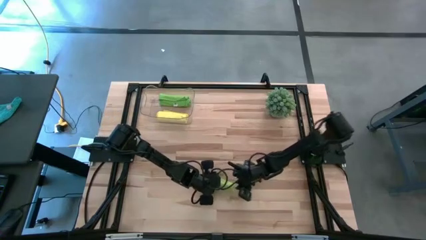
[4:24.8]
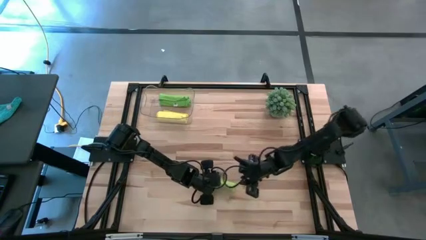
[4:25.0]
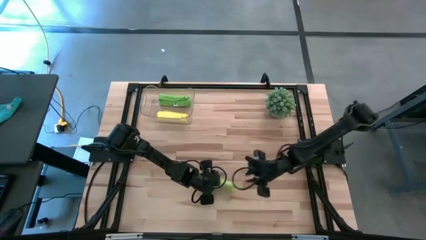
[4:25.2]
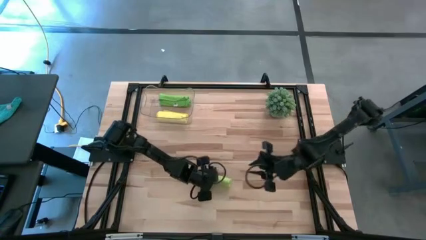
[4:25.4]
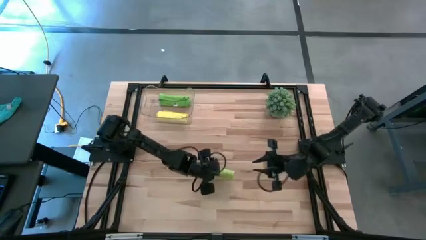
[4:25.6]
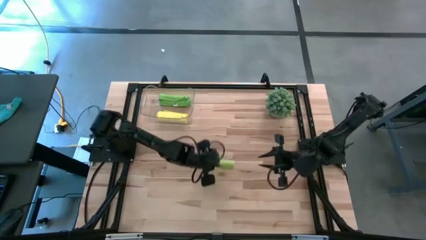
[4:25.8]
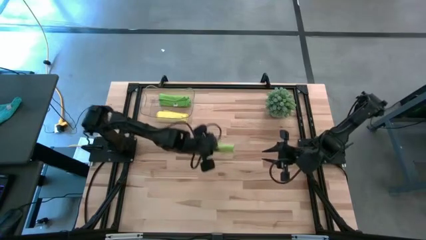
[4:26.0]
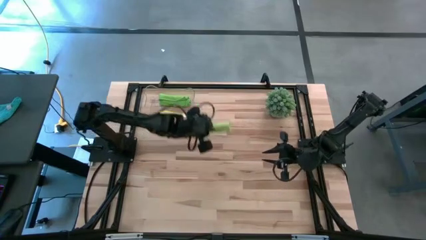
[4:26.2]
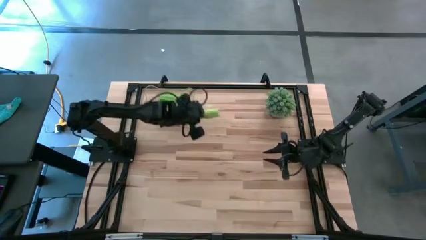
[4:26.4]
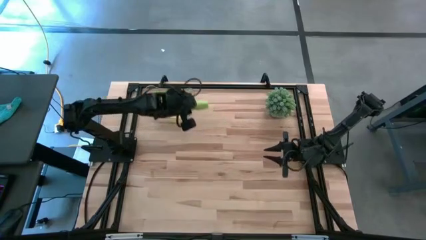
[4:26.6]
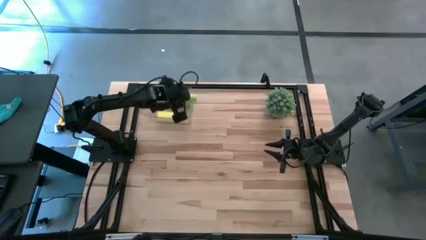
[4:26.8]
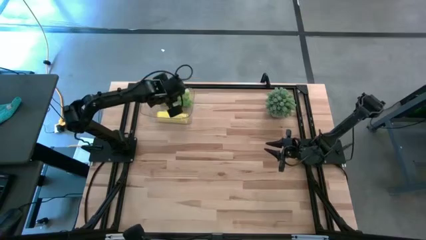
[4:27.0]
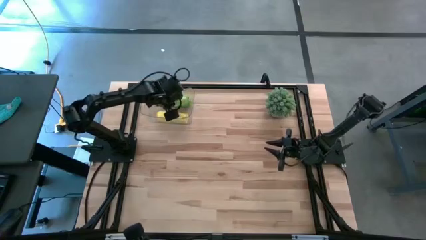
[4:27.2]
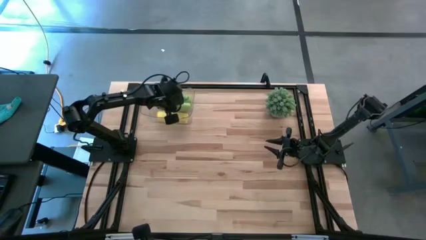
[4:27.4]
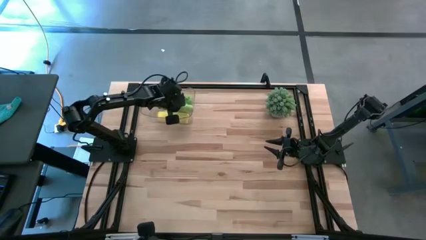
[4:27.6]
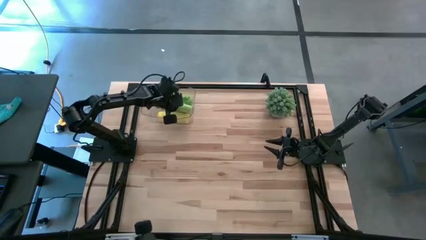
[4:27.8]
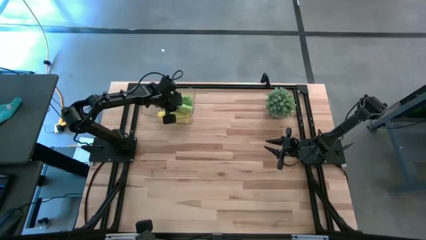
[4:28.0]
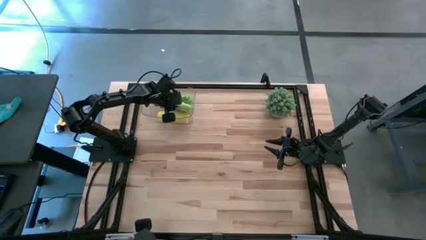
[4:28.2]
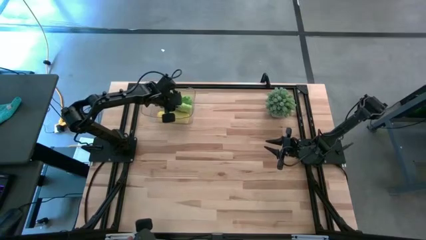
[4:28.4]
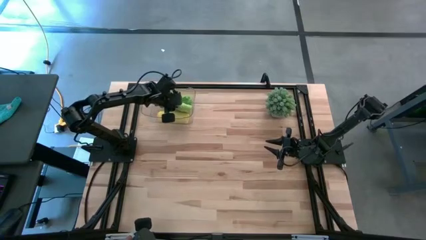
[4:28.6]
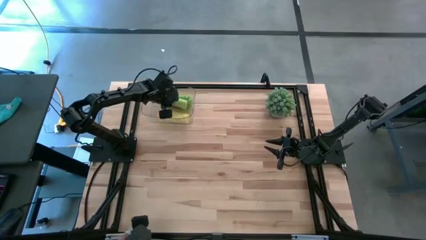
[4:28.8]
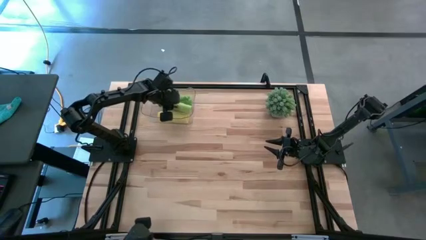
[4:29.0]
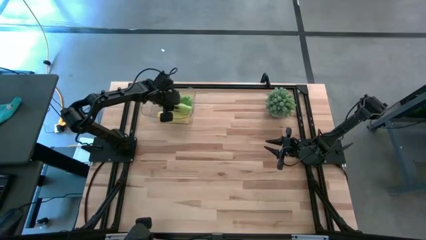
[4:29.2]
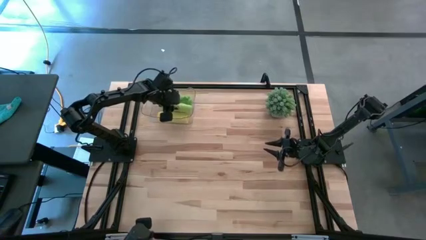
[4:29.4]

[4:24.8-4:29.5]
Task: Roll microfiber towels into tight, uniform cylinder then place into a basket
Put the light green microfiber cloth into the transparent bin

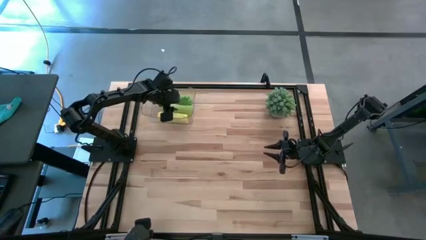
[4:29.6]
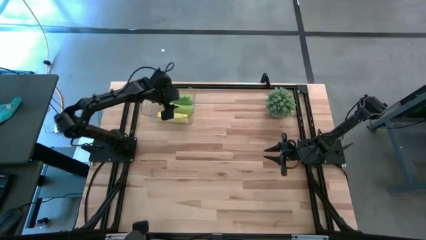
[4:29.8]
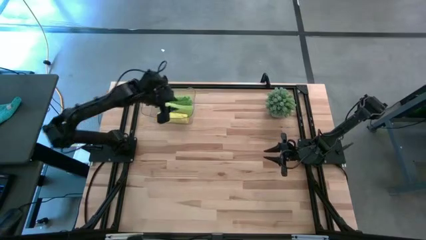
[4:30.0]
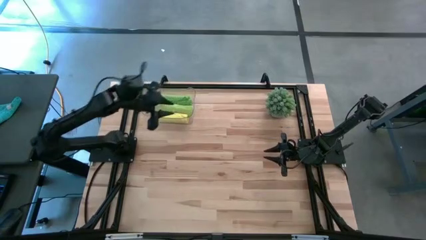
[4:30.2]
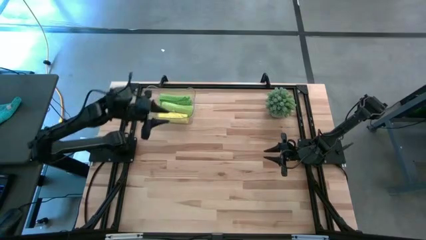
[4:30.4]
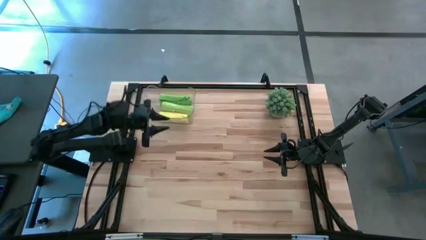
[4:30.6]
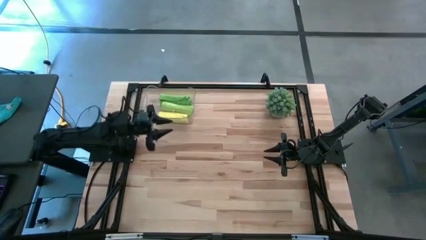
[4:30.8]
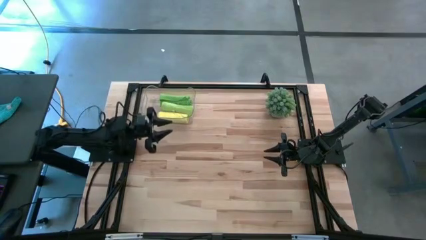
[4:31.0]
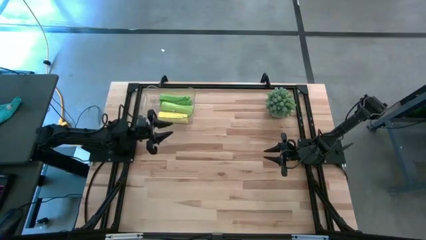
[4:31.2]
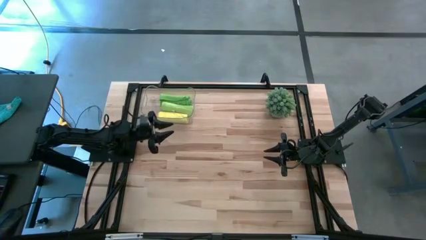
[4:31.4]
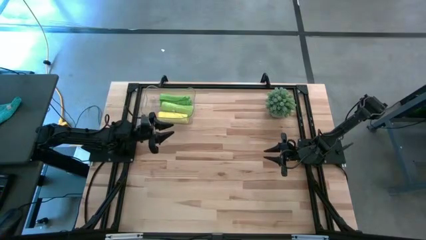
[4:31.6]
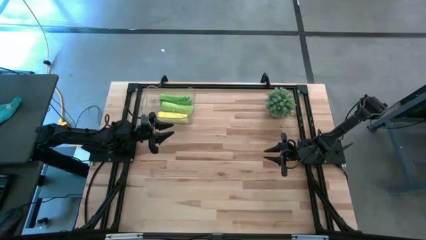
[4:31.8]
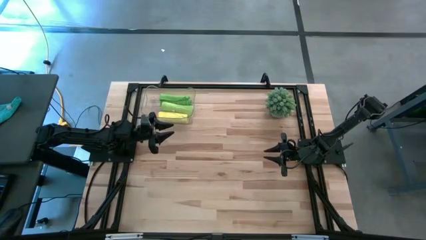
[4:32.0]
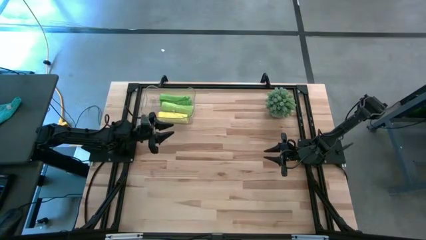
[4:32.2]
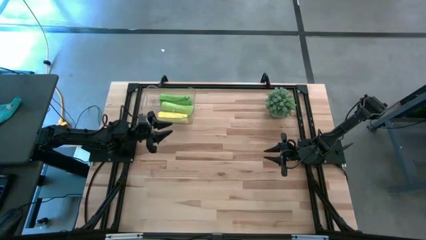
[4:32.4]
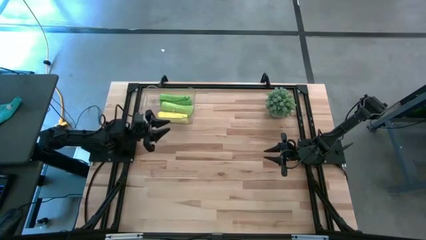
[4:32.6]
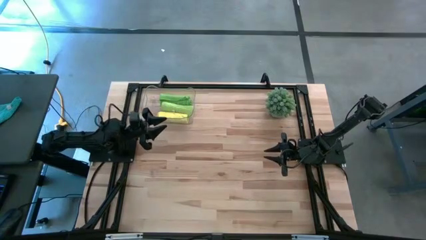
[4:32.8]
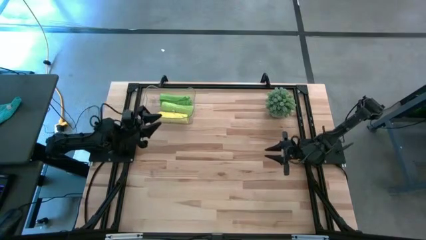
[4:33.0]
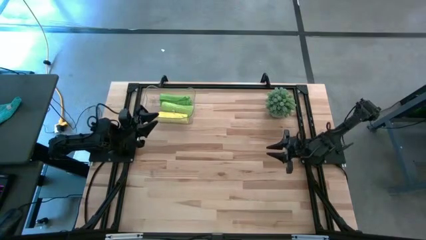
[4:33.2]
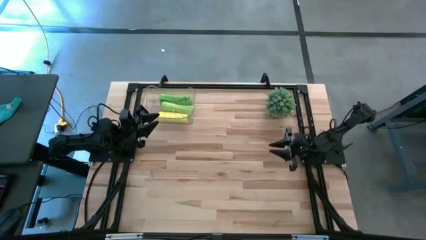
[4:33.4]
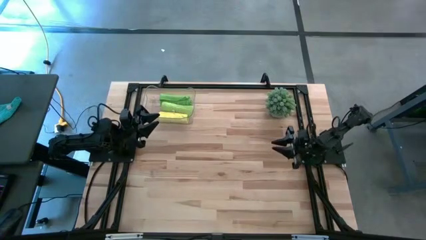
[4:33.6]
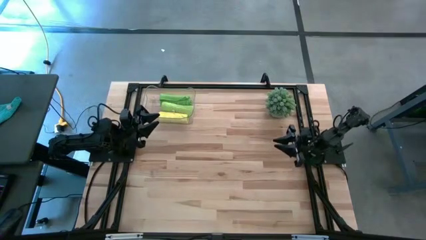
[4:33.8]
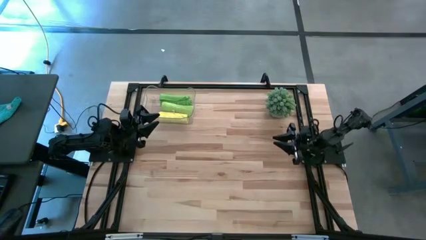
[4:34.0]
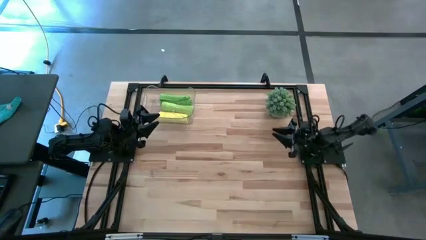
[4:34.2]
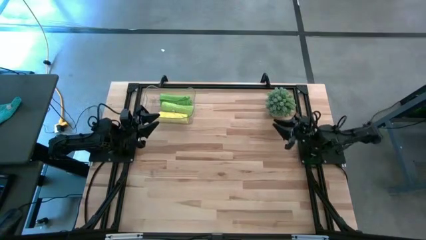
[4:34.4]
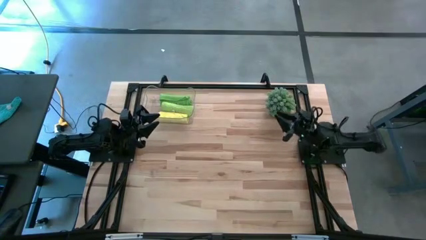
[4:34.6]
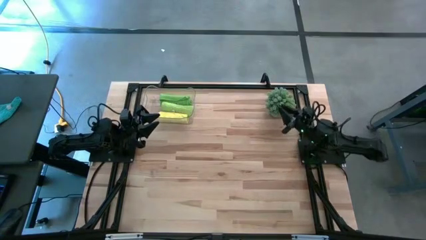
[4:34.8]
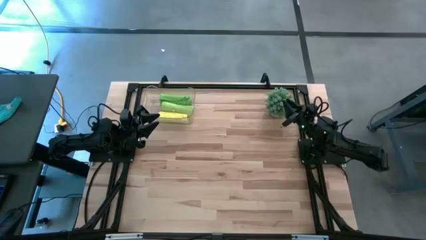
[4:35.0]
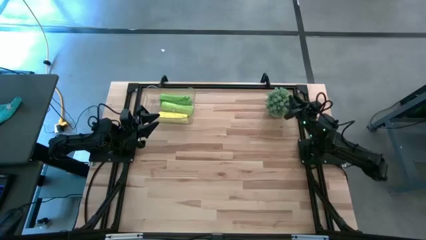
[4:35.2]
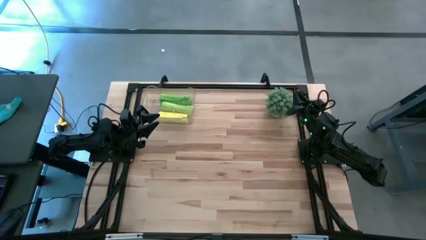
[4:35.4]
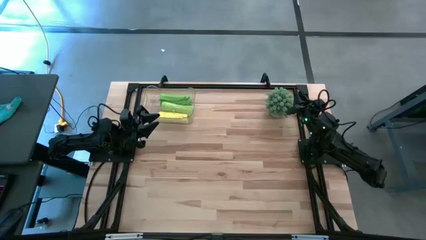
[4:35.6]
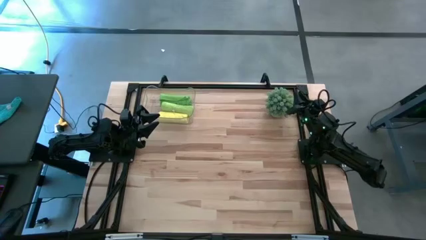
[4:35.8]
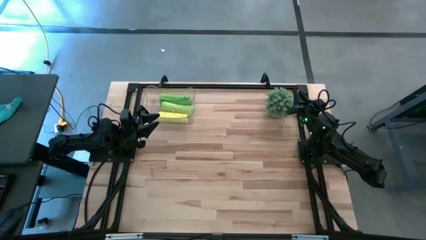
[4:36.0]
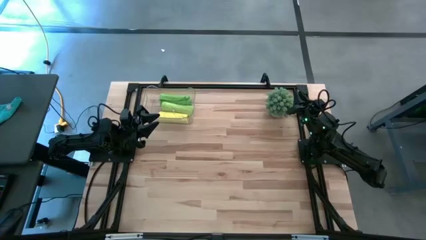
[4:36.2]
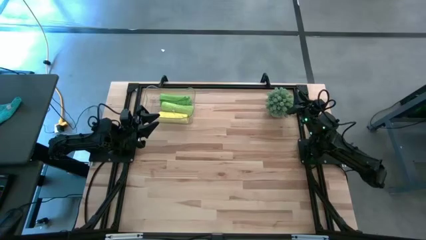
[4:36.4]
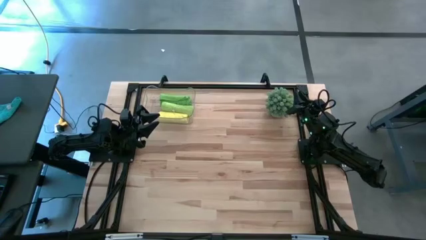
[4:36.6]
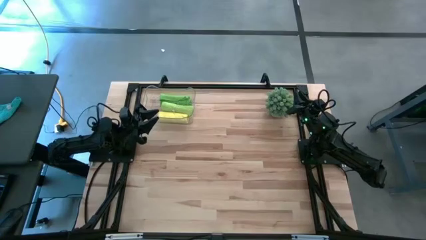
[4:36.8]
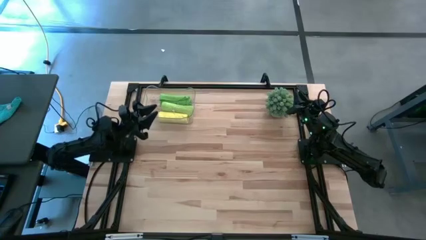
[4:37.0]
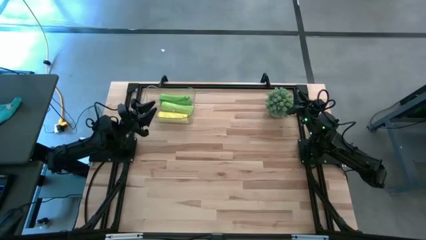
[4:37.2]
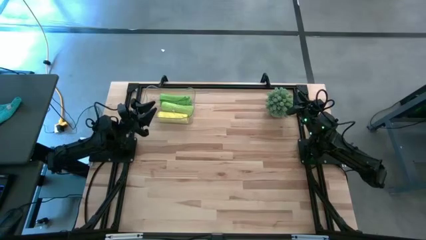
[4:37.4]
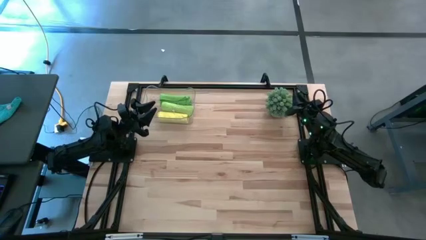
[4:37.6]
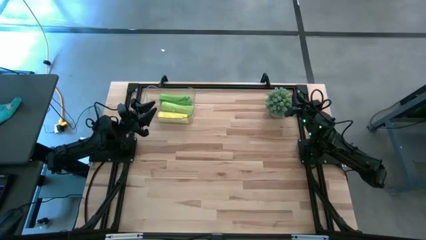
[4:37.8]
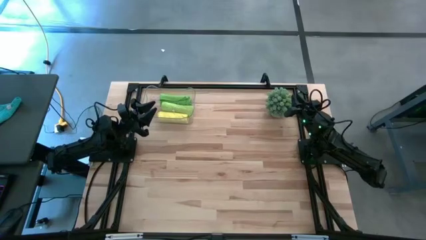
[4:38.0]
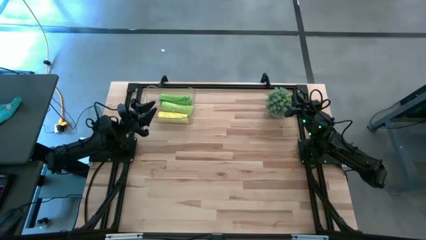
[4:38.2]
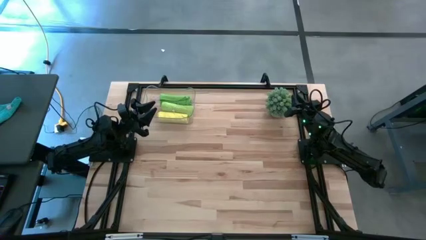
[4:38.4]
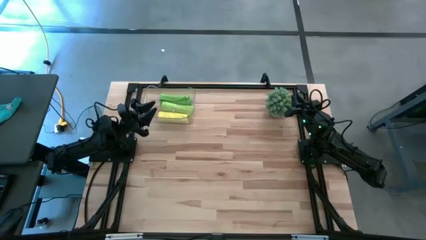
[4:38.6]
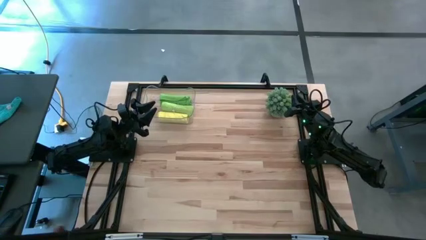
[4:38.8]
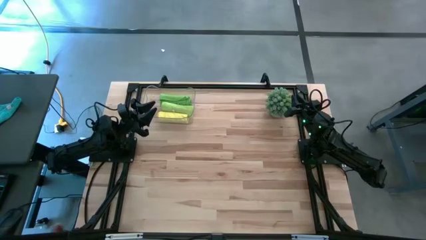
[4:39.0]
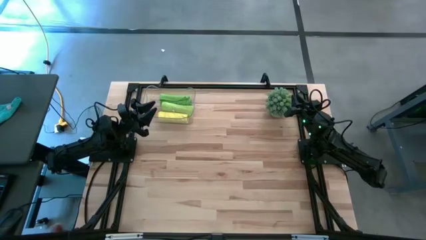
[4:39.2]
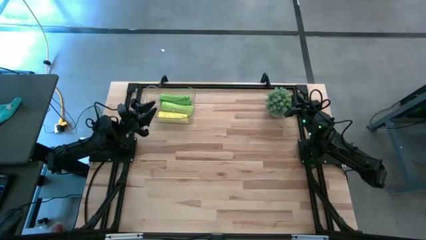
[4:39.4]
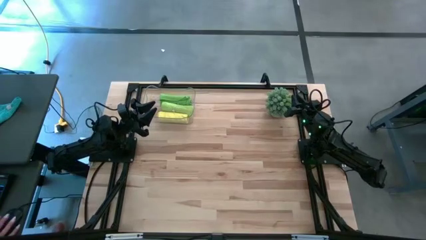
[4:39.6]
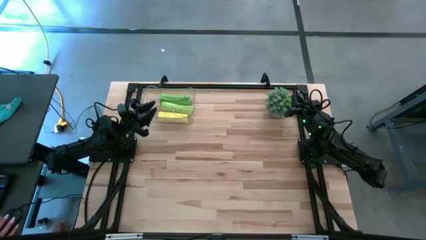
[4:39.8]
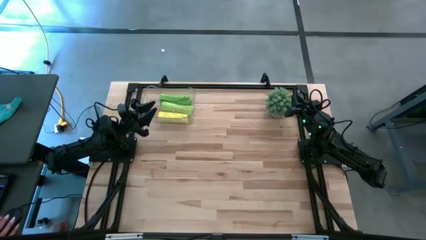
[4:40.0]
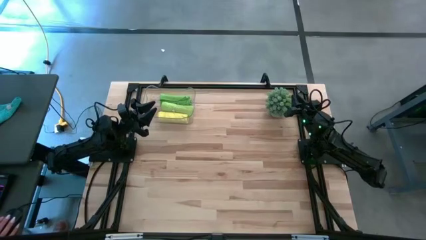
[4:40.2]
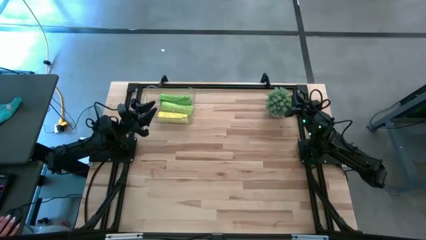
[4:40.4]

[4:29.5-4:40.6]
Return to Home Position

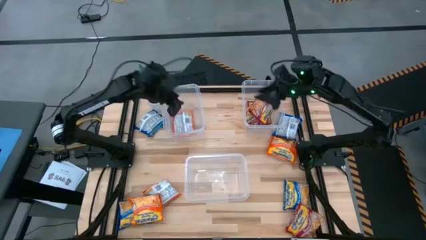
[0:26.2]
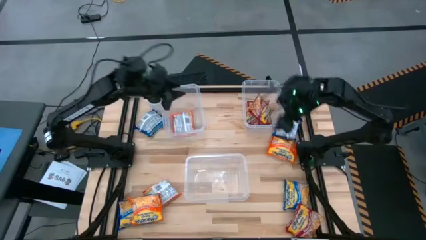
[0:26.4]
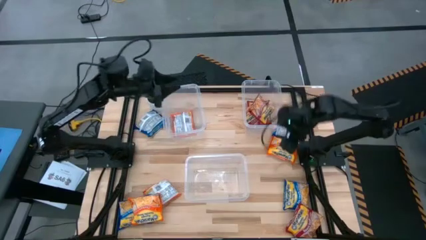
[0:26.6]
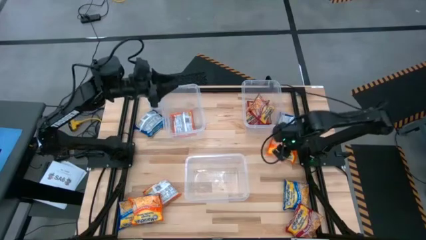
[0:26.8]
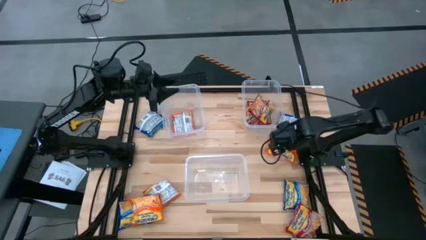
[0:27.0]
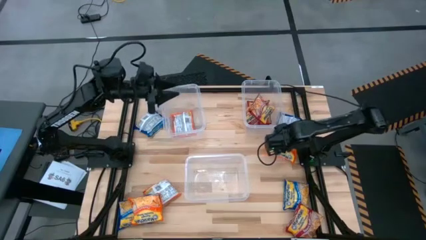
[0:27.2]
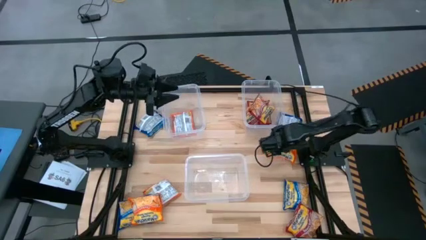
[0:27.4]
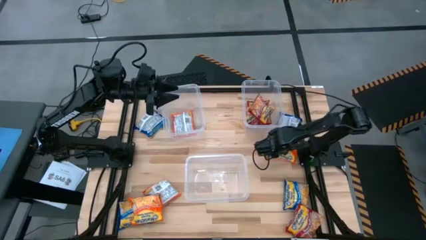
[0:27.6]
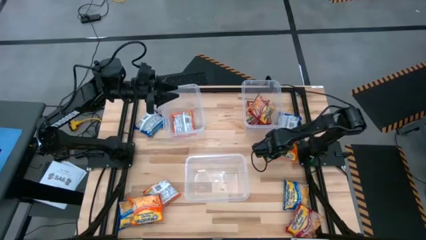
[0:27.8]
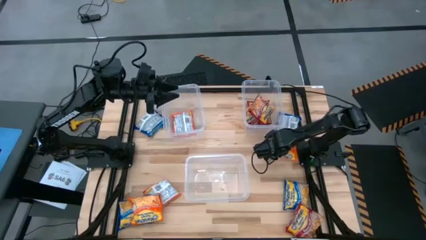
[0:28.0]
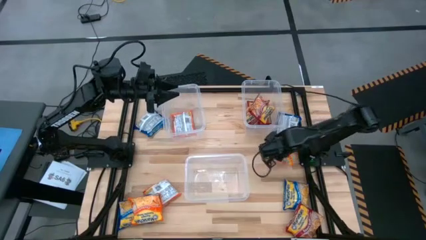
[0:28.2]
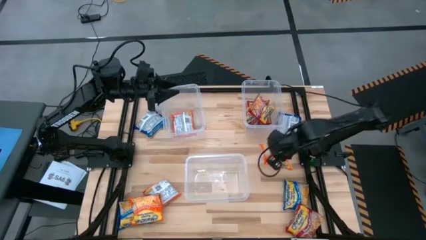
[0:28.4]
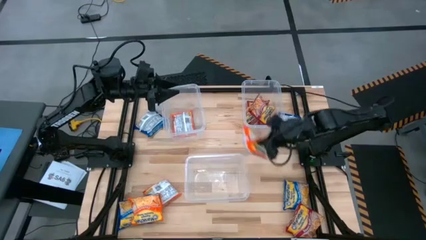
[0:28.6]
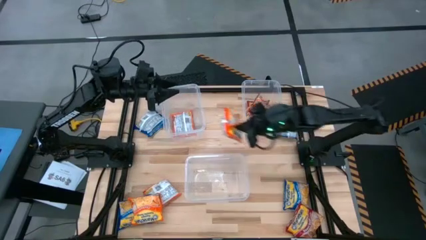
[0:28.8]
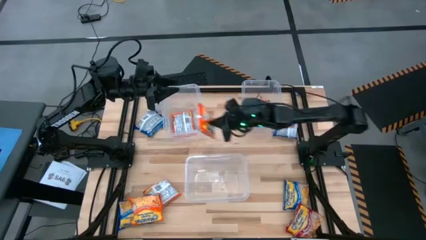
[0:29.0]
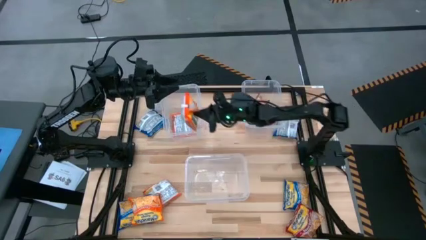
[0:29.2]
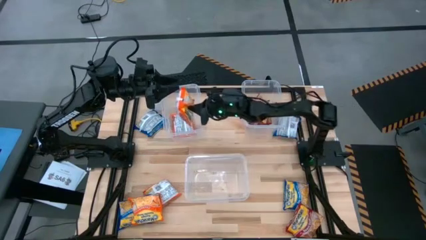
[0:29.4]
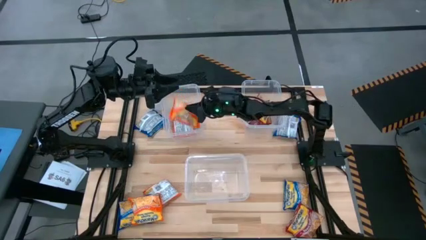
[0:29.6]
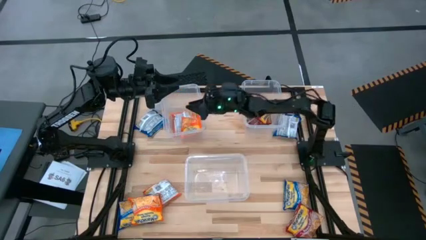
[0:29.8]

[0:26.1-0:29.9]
Task: Sort Maruchan noodles
Put the top right orange bag into the top left transparent bin
